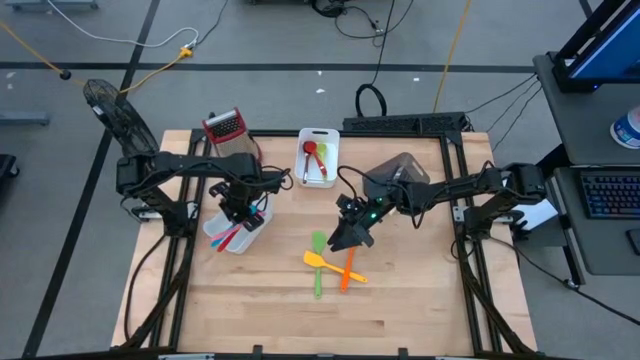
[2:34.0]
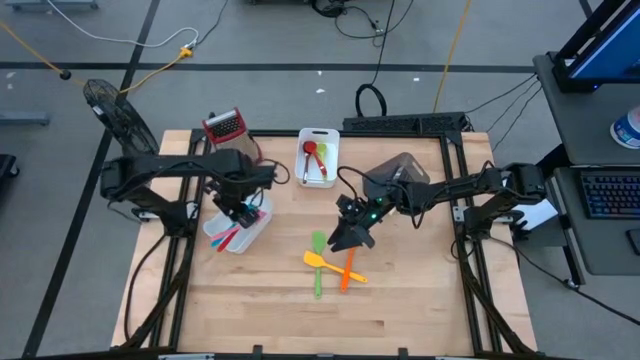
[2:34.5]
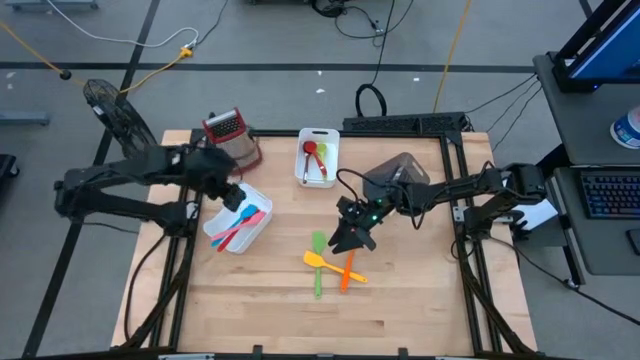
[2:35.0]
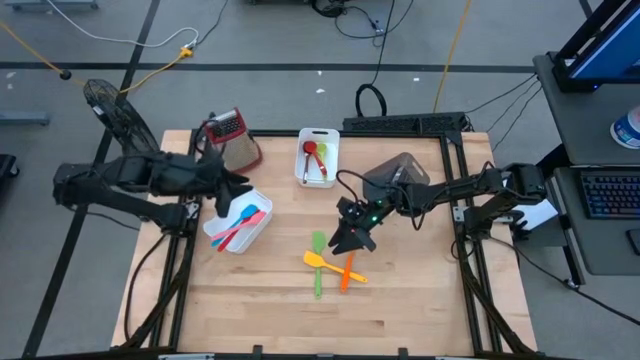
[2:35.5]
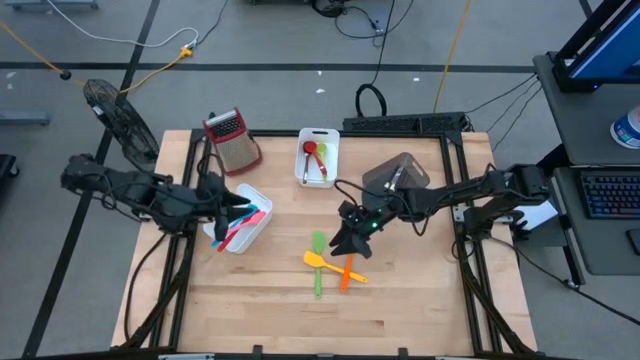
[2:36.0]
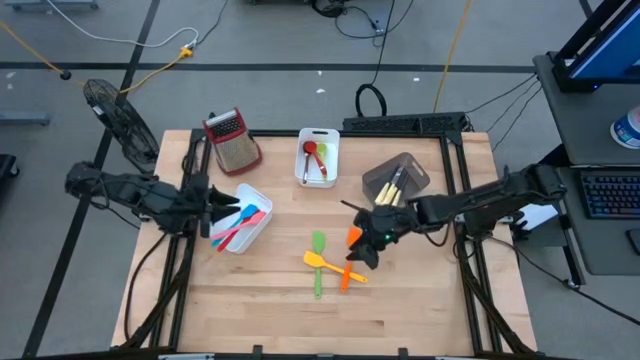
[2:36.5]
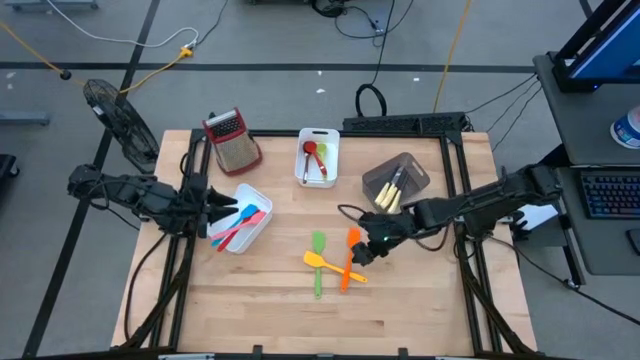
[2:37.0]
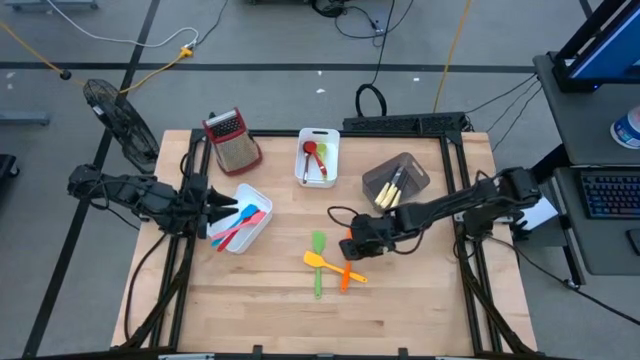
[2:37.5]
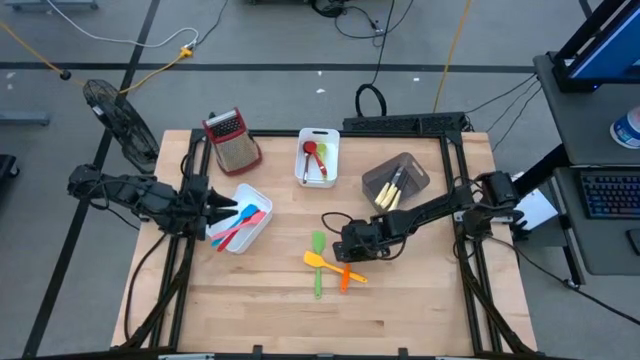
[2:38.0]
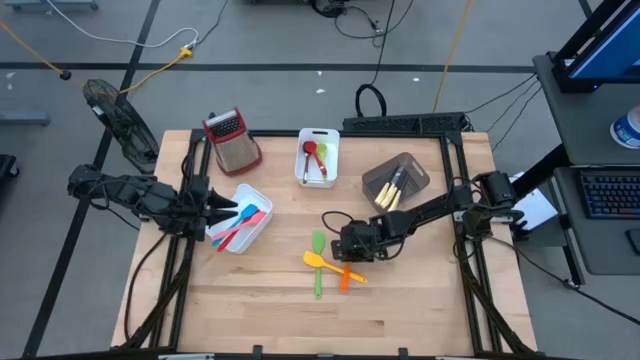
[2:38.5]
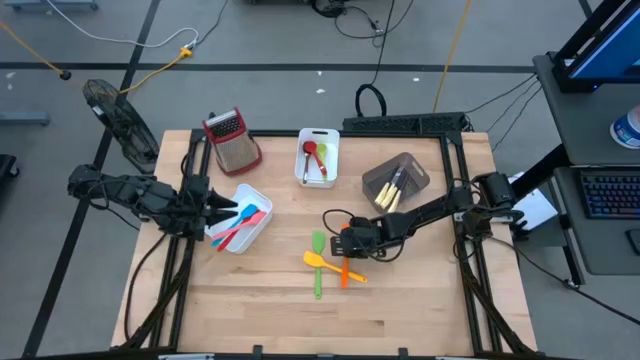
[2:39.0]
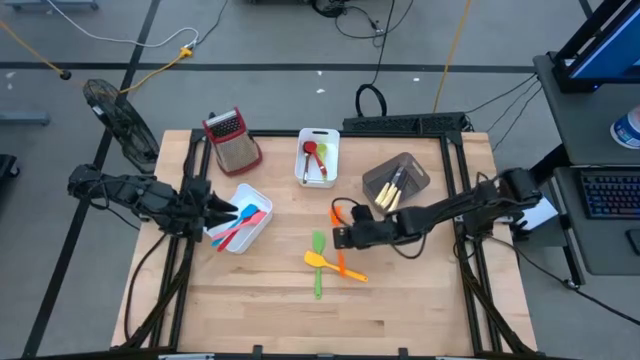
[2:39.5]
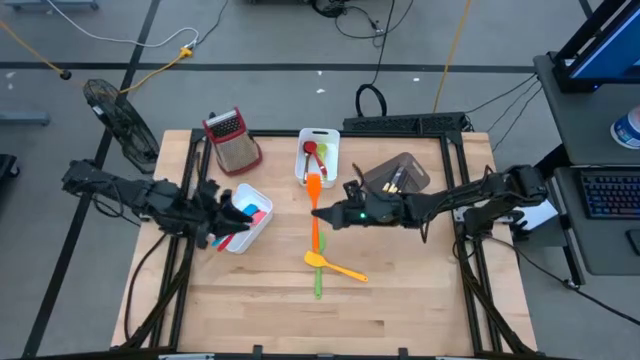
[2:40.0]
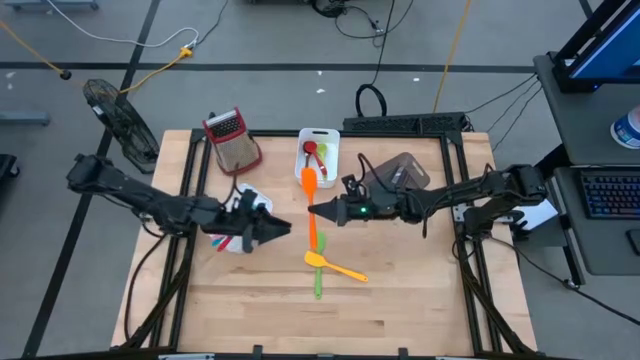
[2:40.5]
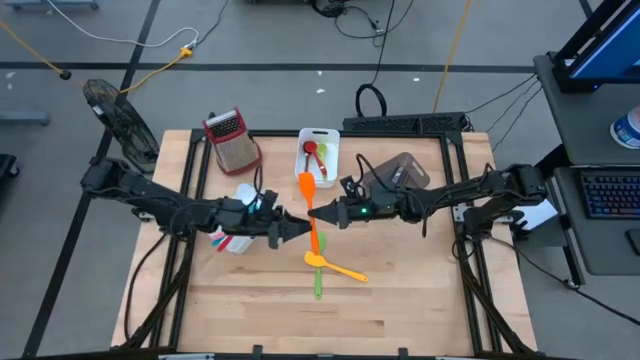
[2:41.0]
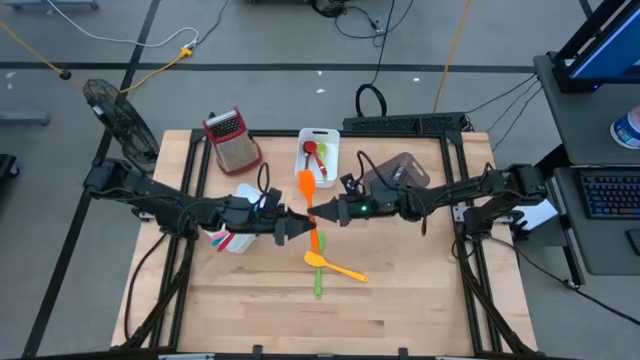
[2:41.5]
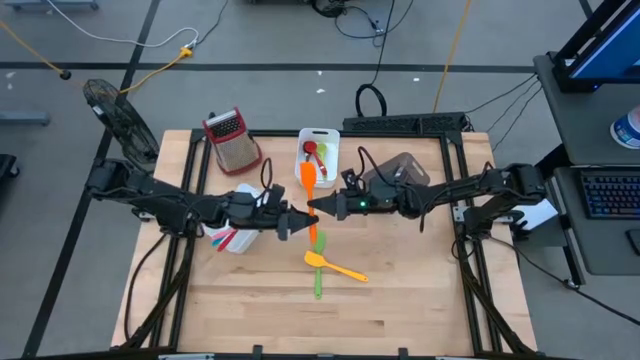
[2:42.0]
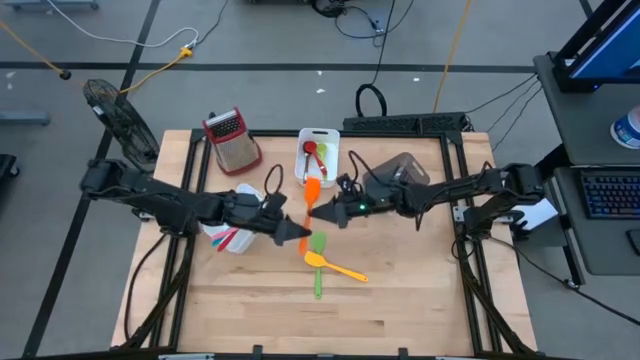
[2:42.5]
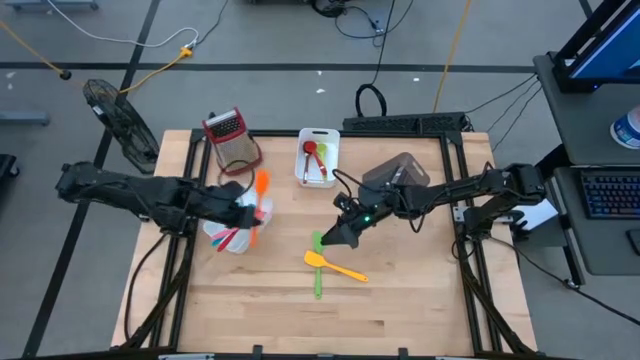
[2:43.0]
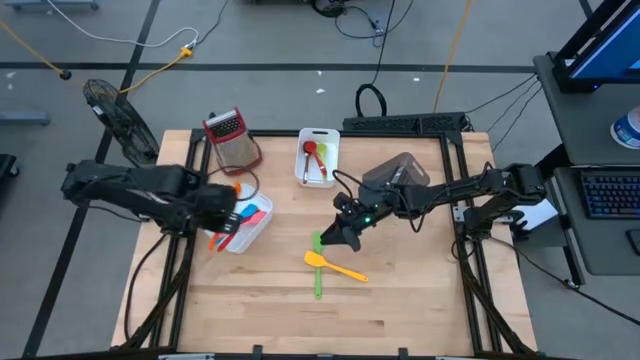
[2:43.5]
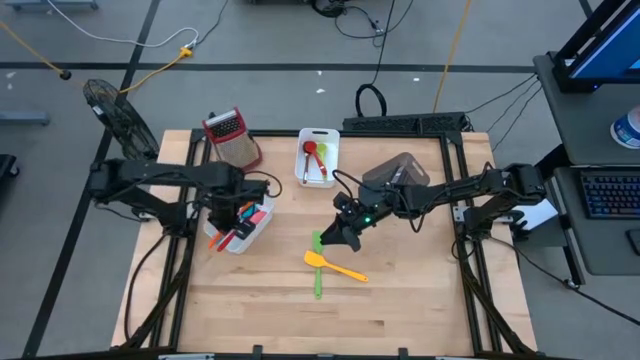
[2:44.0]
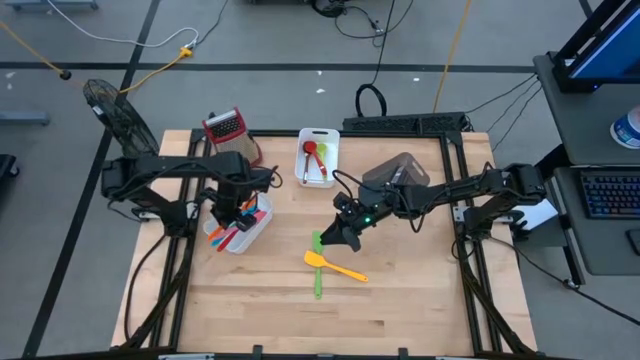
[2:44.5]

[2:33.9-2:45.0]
Task: Pick & Place Kitchen Items
Put the orange spatula into the bottom white bin

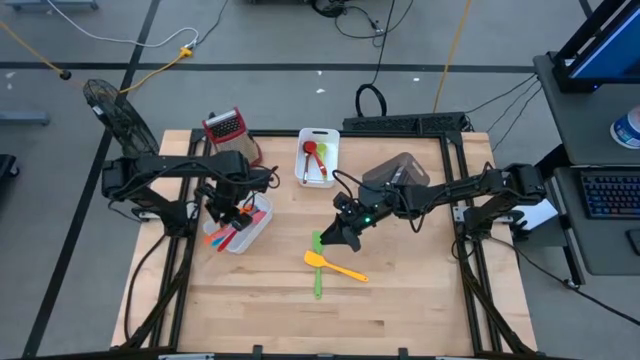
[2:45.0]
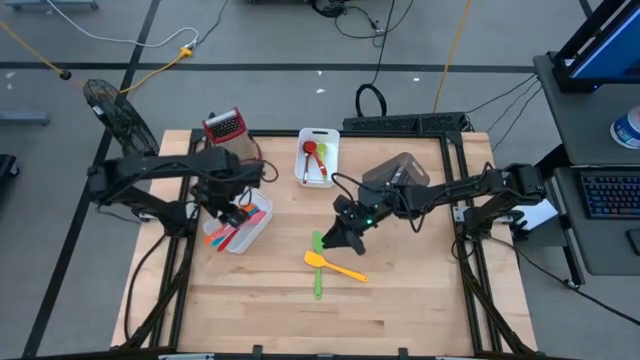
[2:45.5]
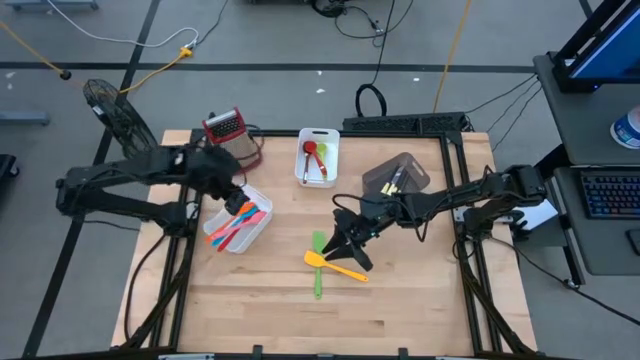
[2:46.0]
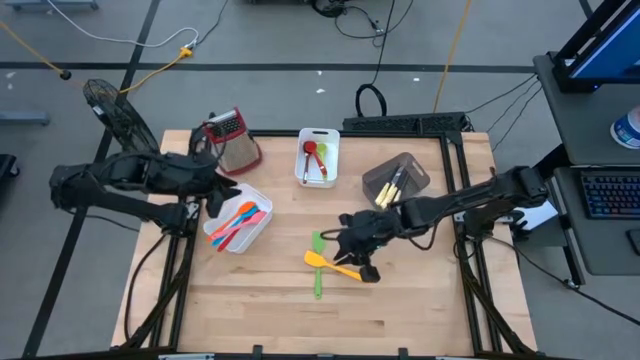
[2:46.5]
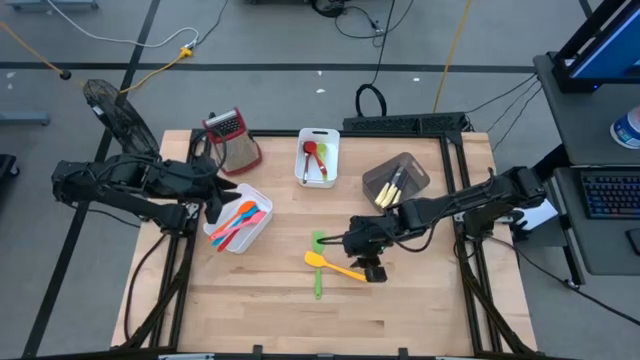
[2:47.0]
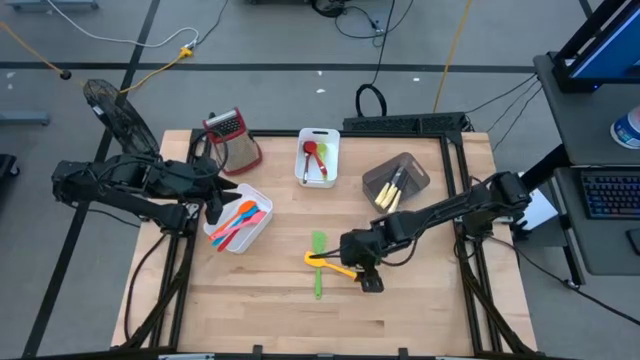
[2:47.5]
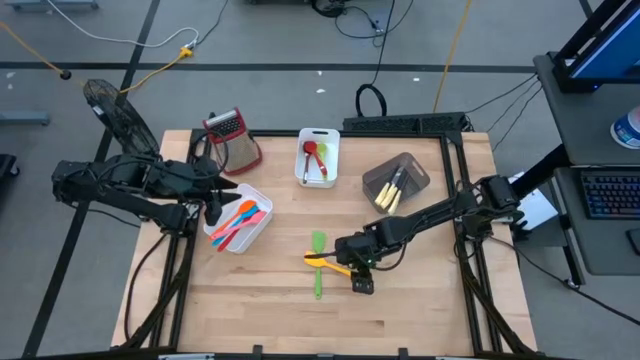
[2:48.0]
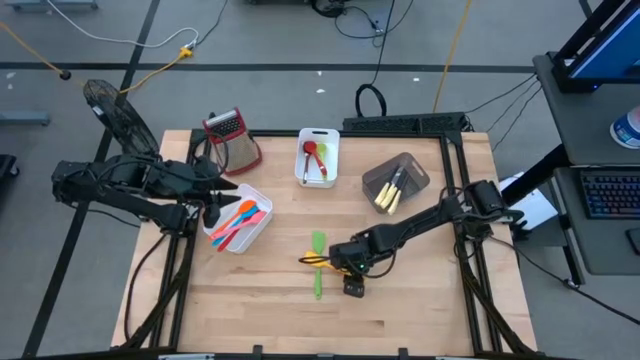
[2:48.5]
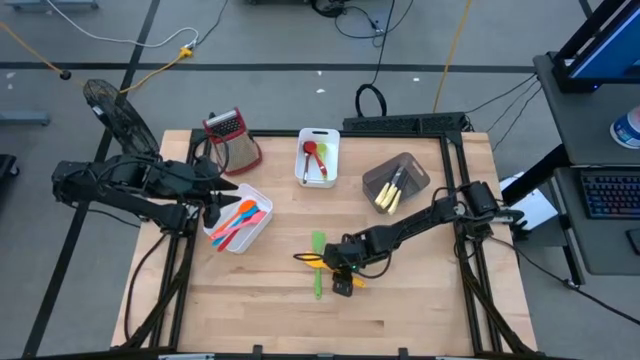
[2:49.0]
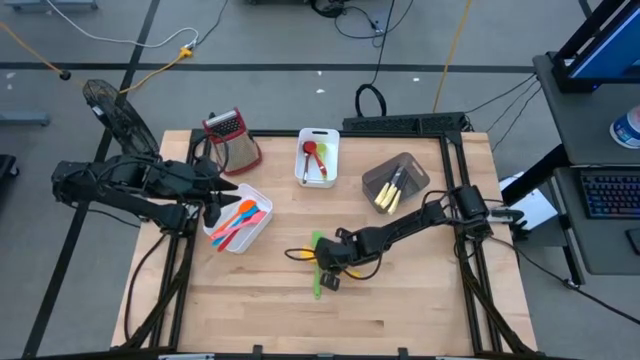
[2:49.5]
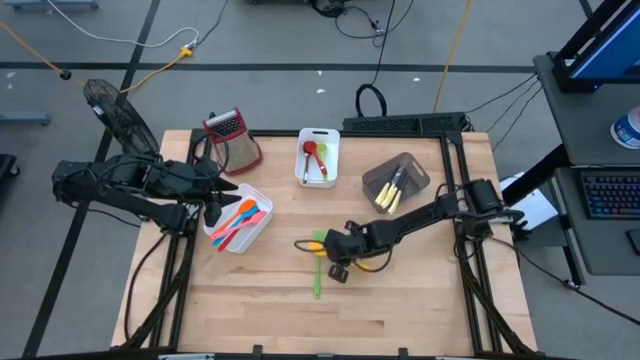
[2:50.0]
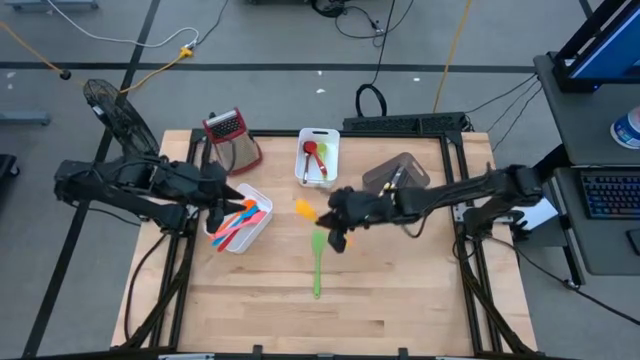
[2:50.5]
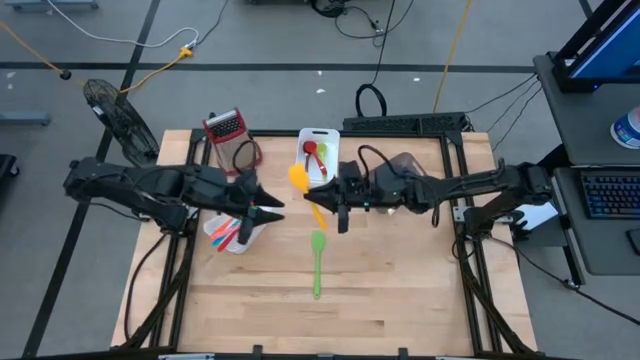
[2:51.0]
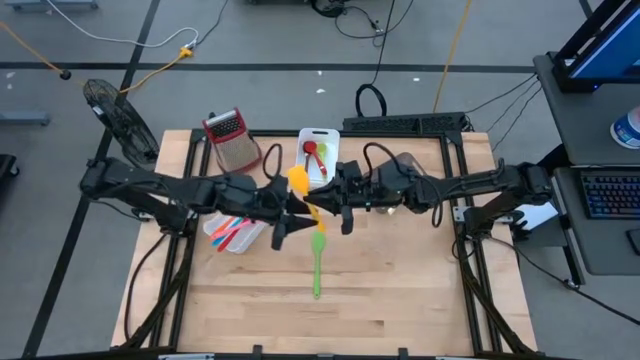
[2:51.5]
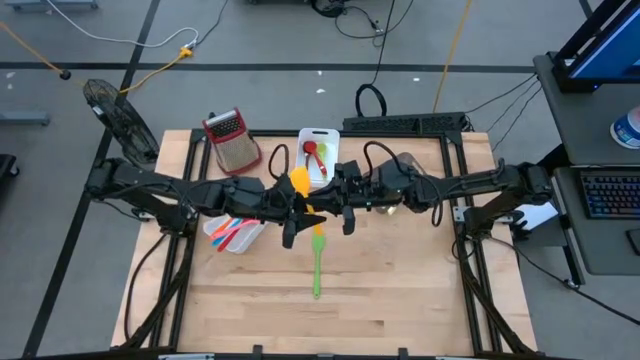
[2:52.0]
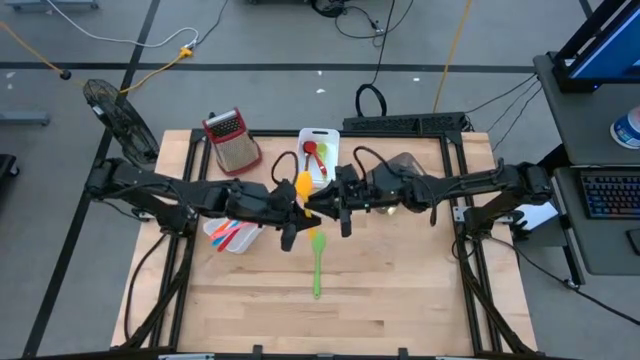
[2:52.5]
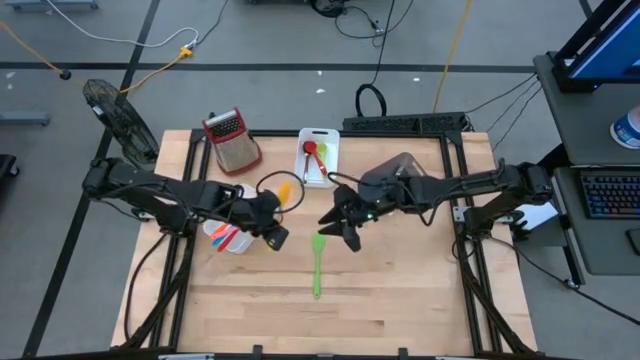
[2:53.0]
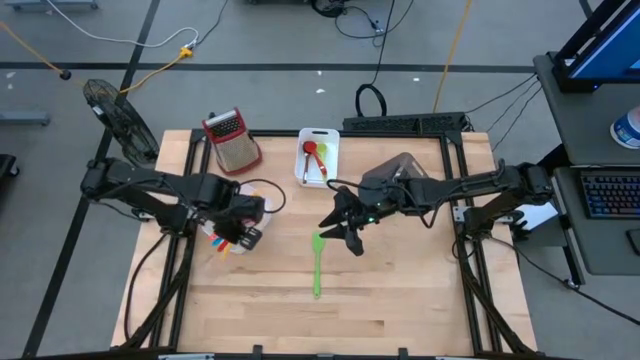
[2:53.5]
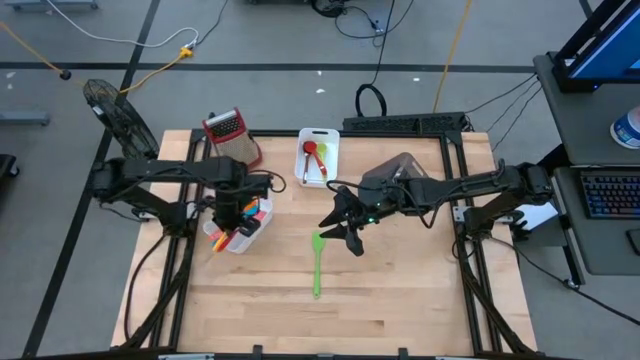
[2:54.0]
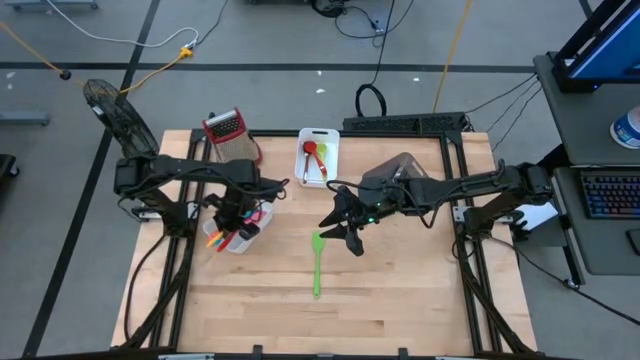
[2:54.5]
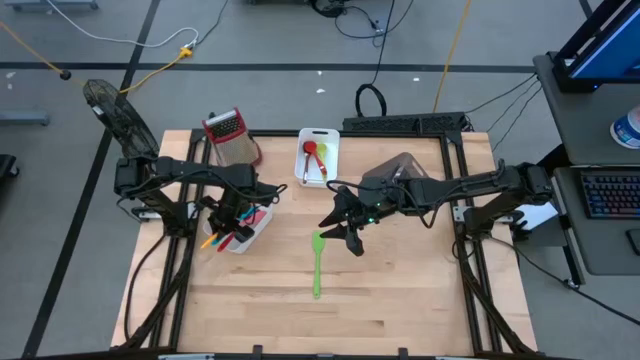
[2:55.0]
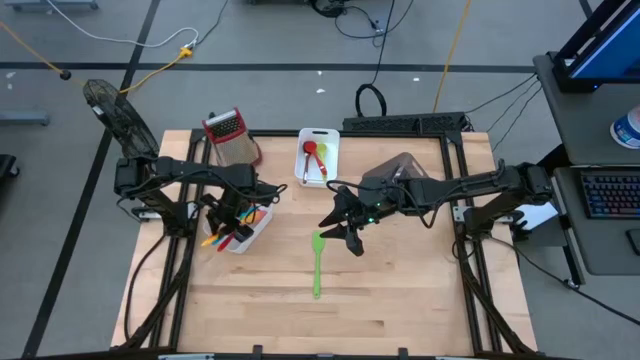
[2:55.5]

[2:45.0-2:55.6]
Put the yellow spatula into the bottom white bin
